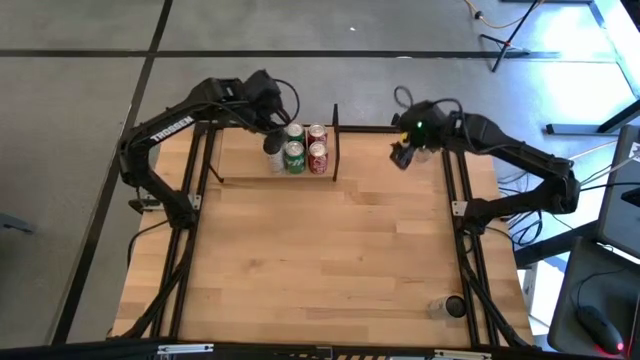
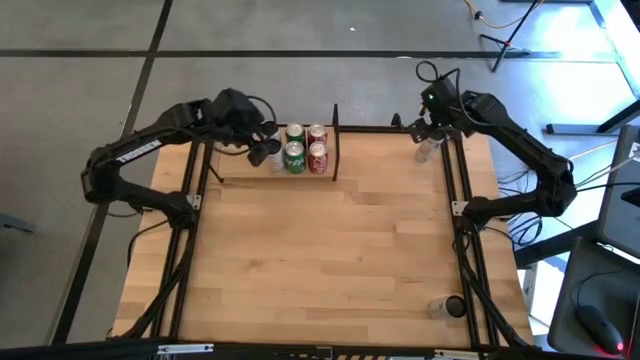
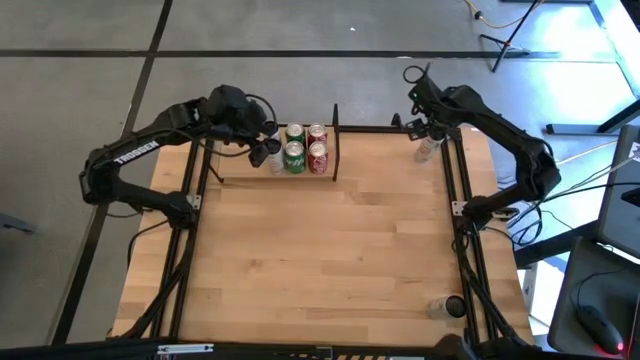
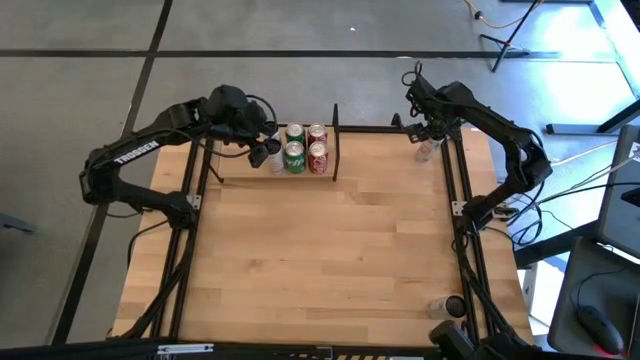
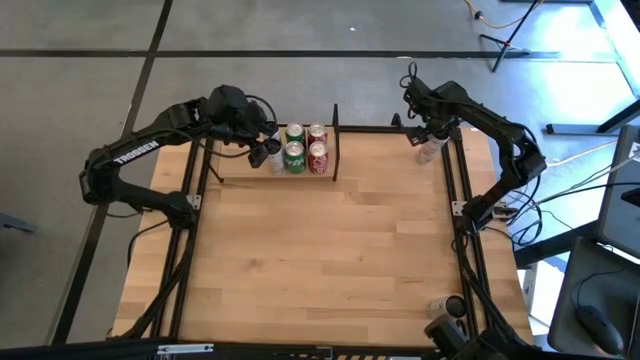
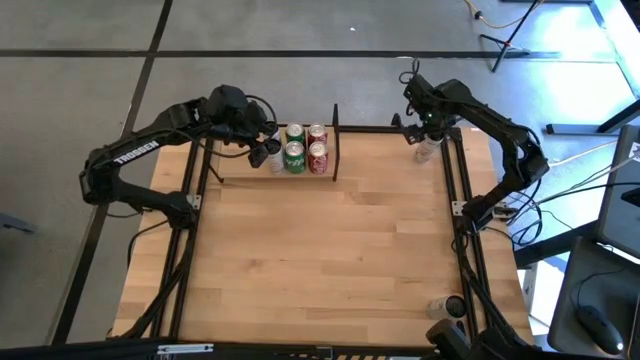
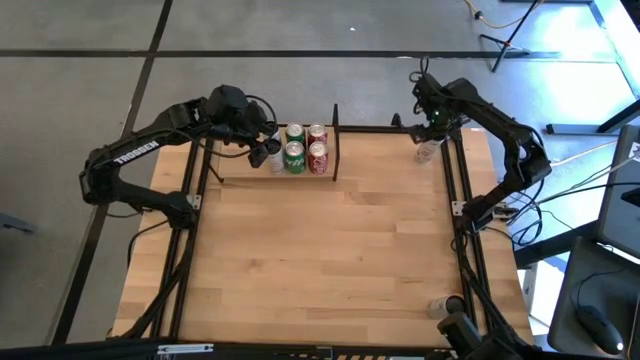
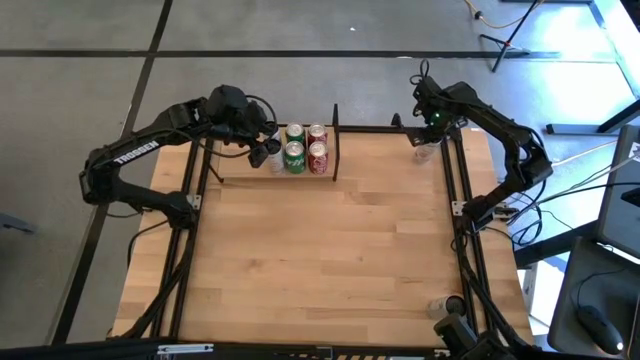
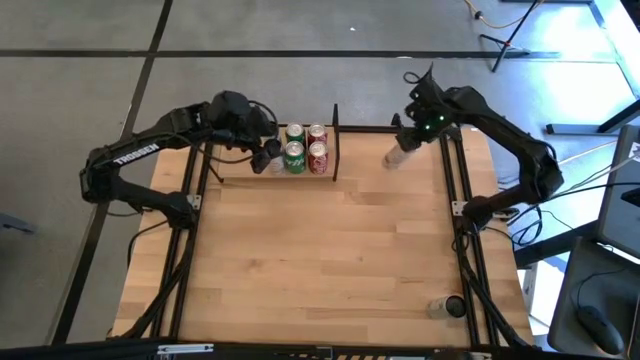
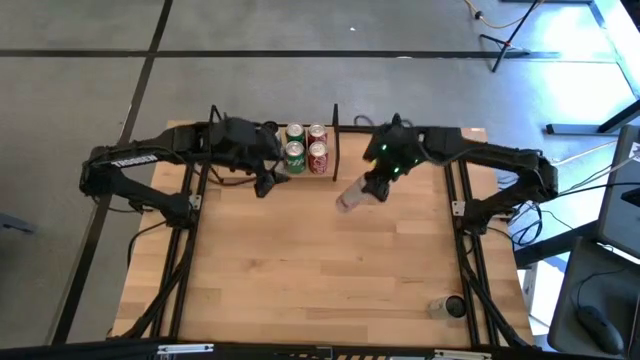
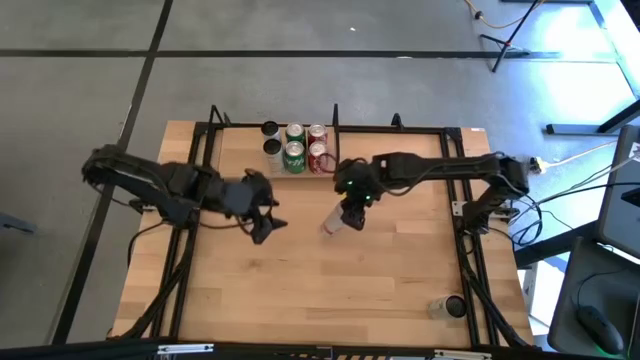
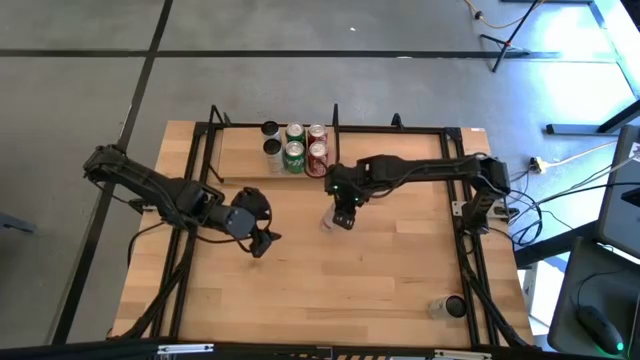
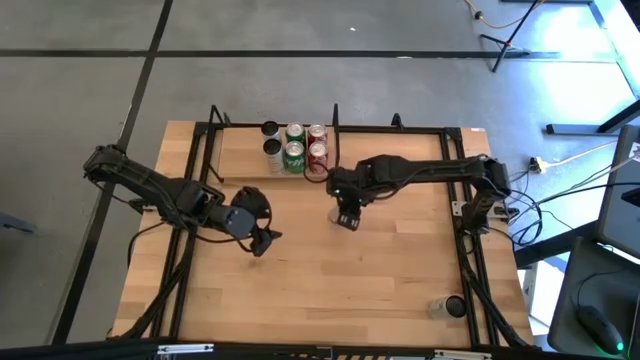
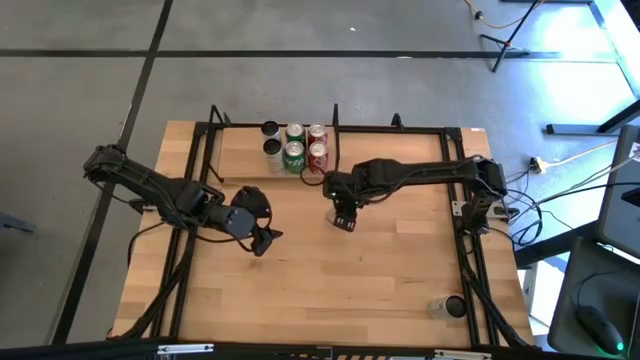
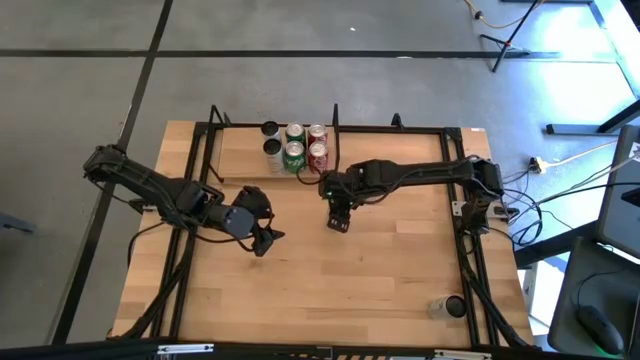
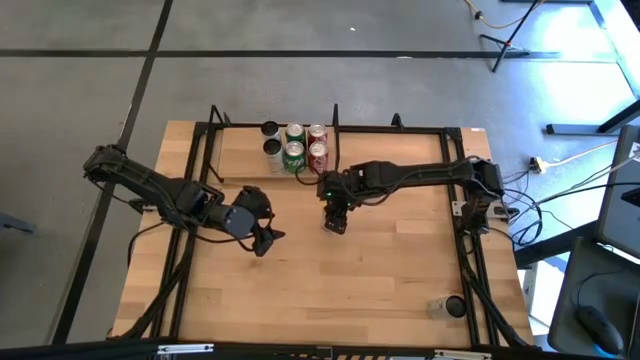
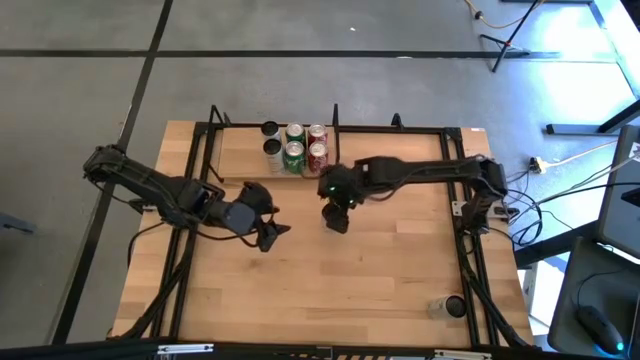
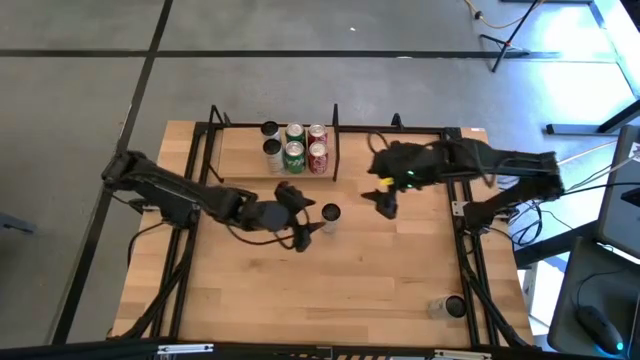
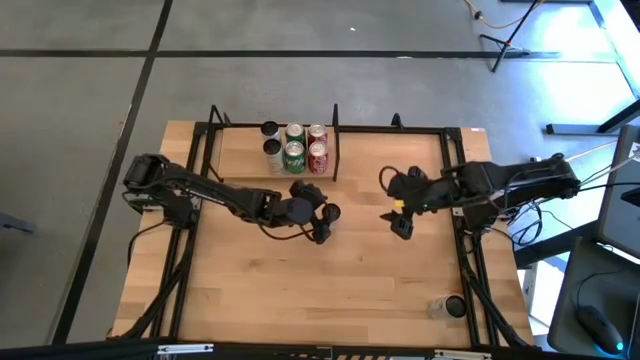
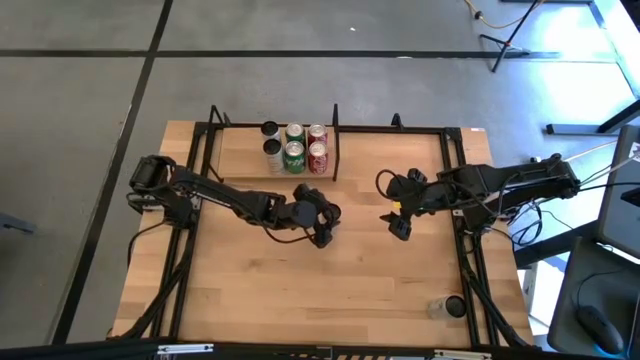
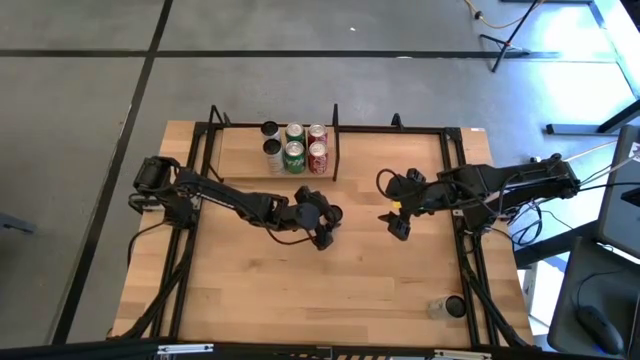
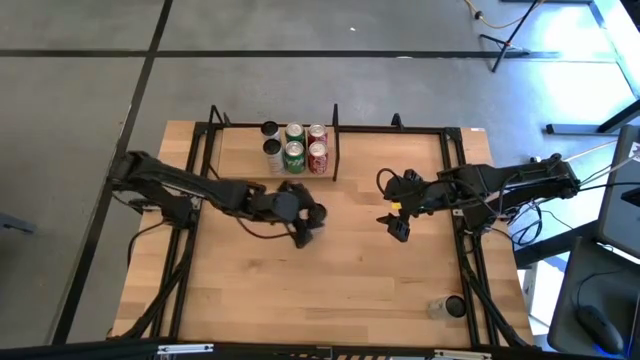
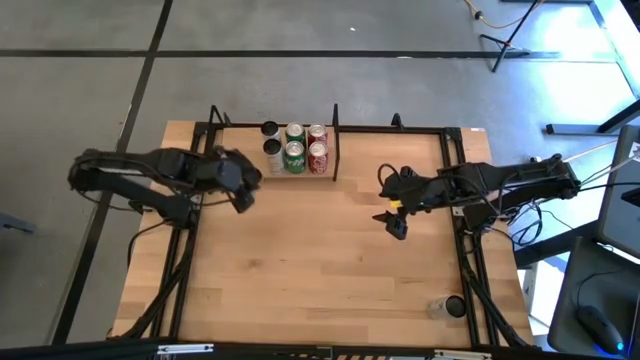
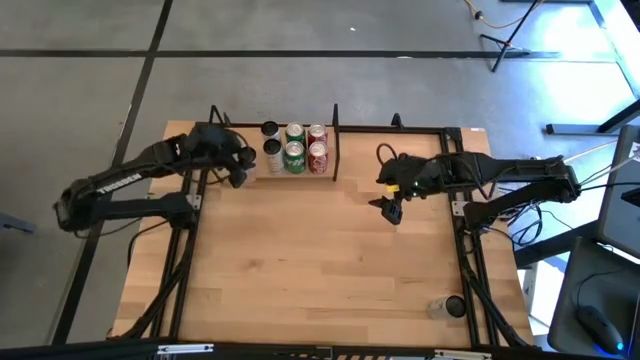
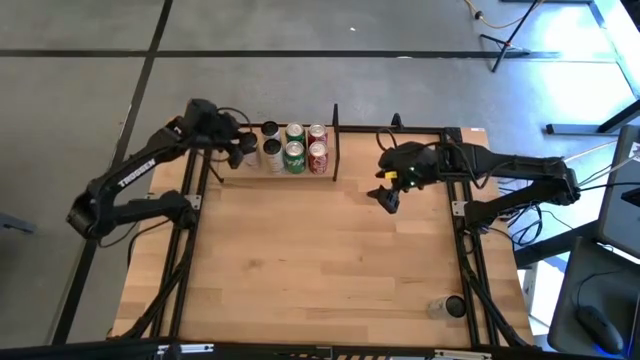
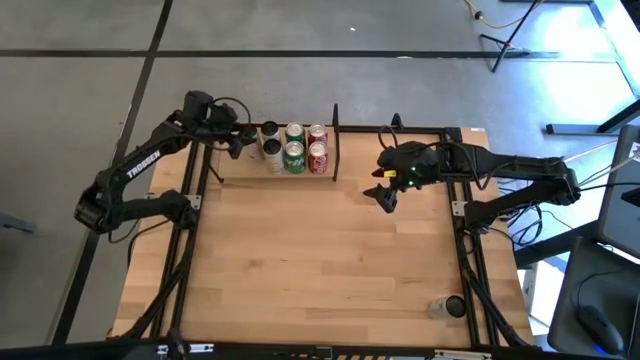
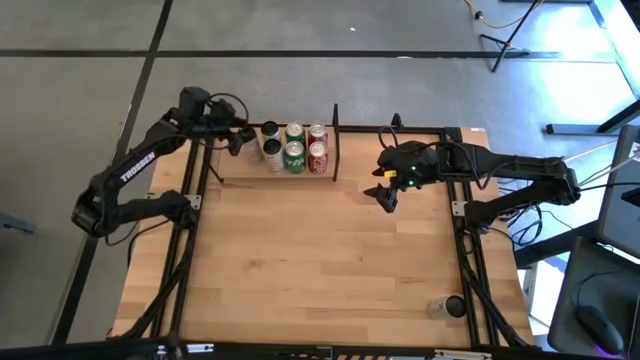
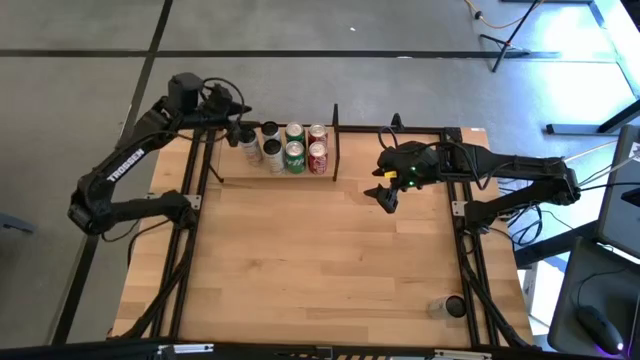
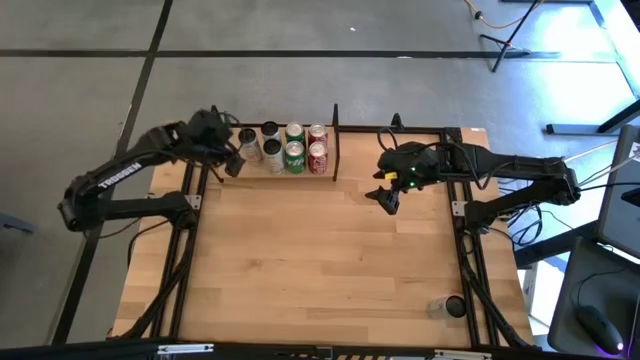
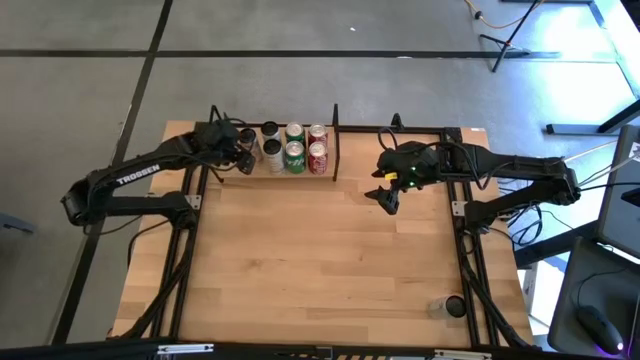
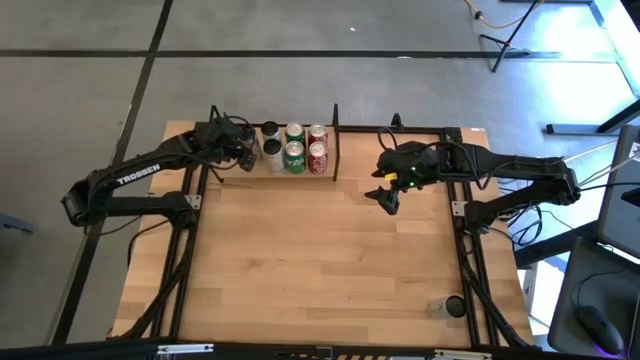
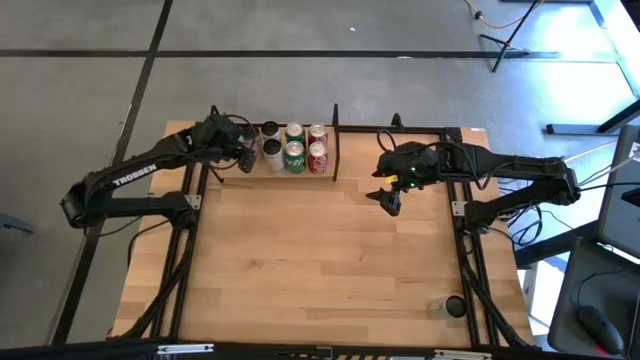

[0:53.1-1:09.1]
Task: Place canned beverage on shelf
Put the top white-pink soda can on the shelf

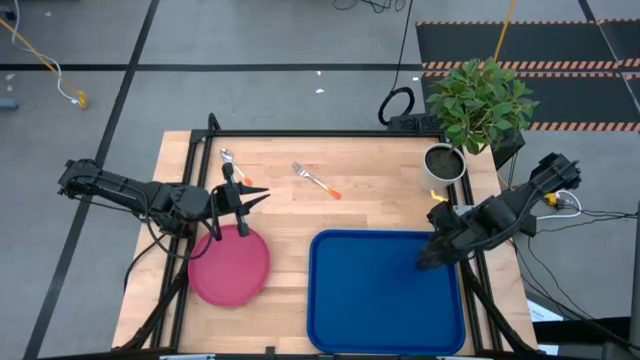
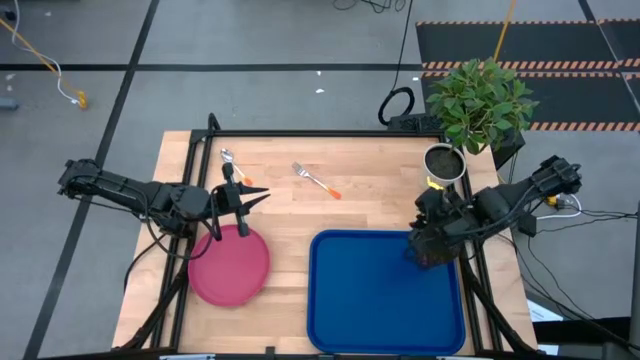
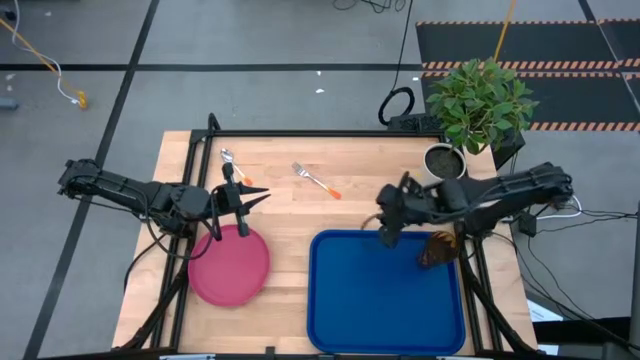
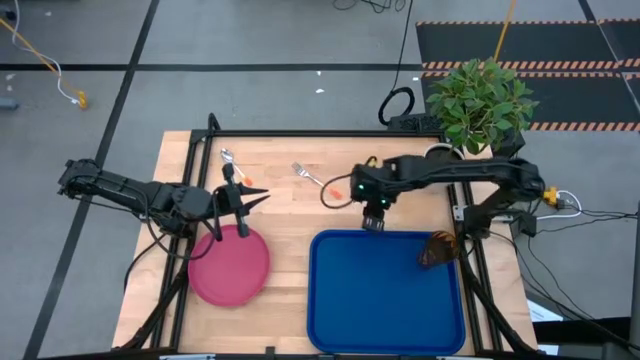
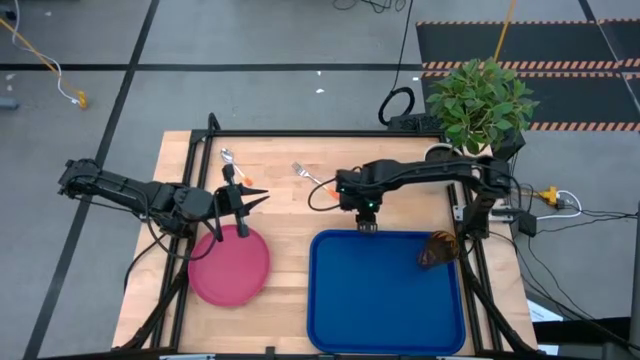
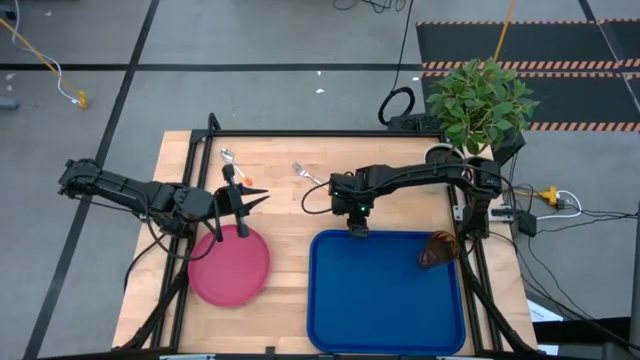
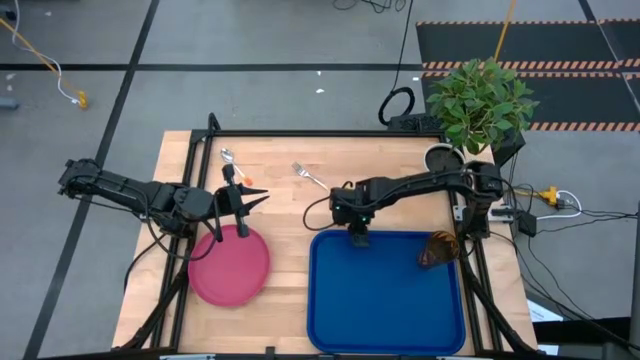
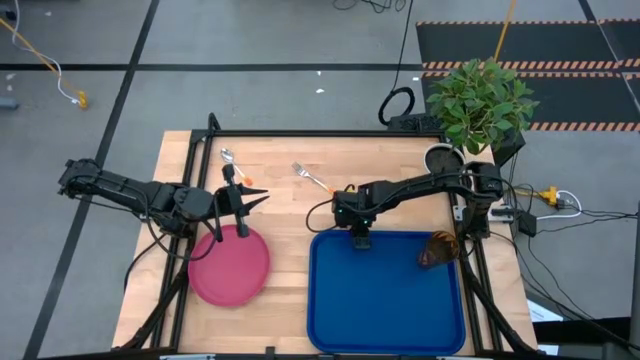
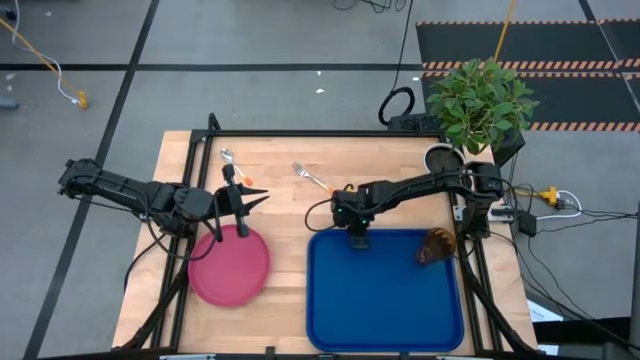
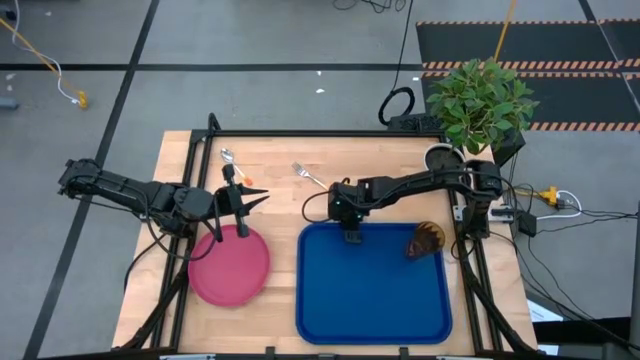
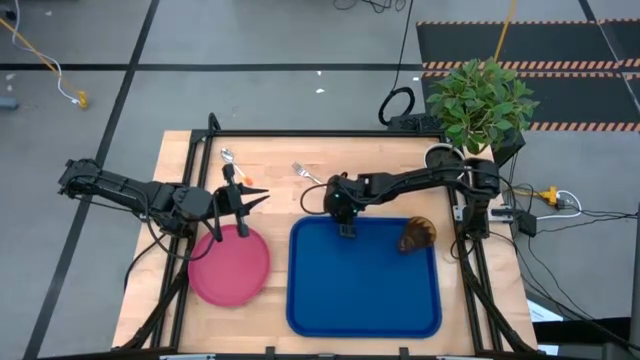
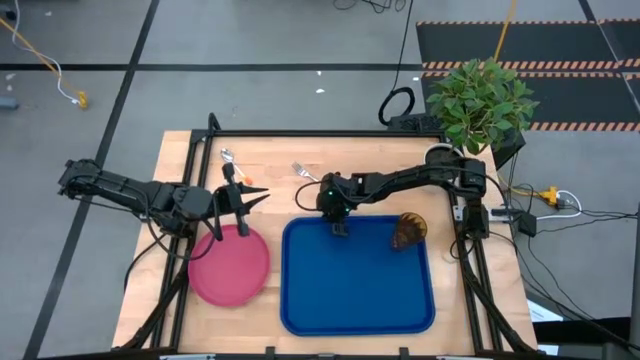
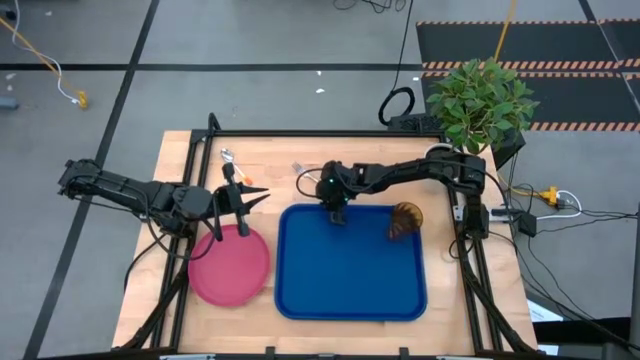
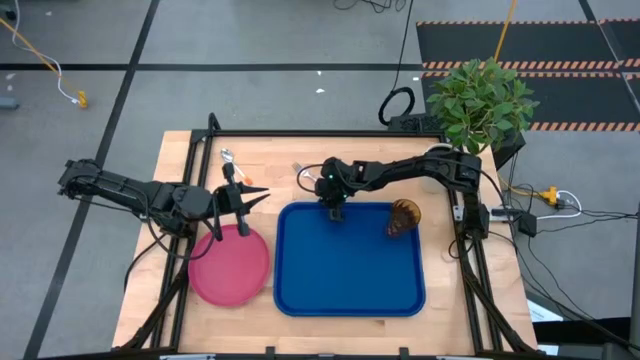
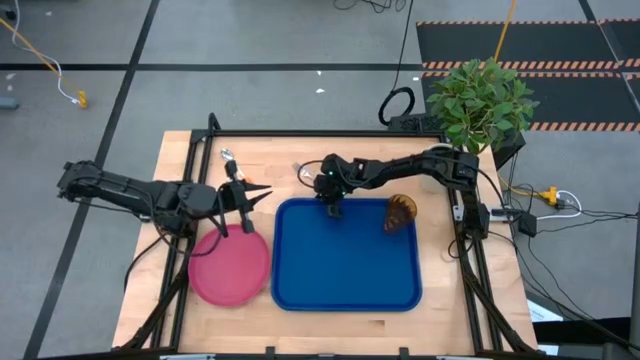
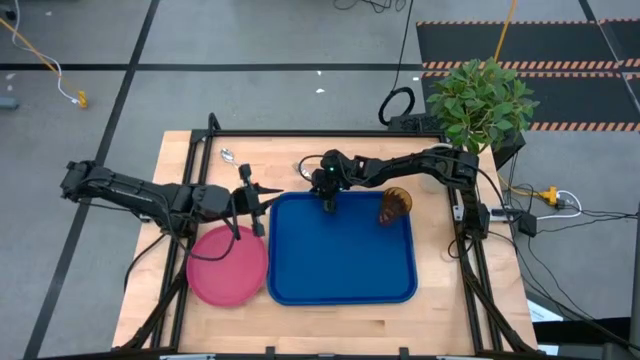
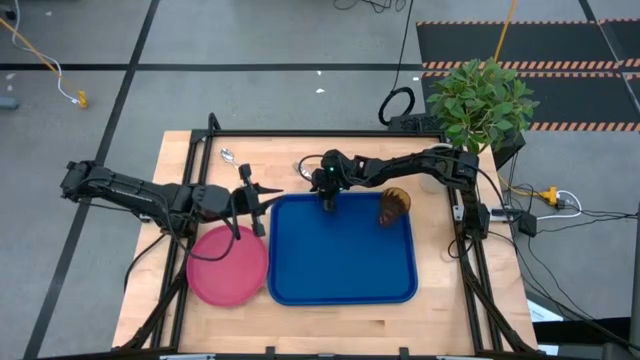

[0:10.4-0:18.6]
Task: Pick and place plate/cup/fork/spoon on tray
Move the blue tray to the center of the table
